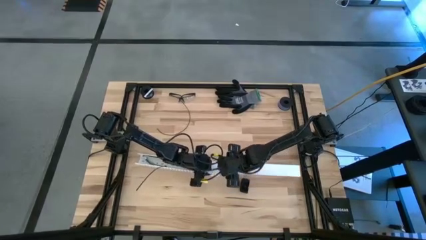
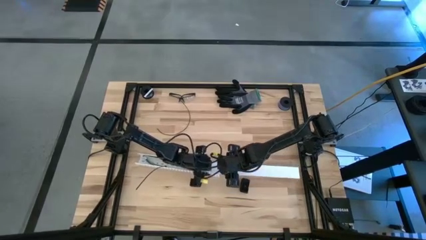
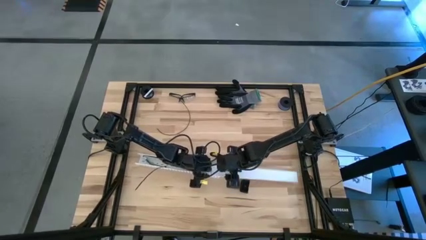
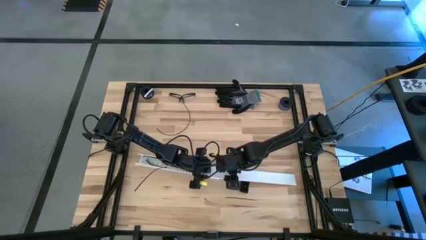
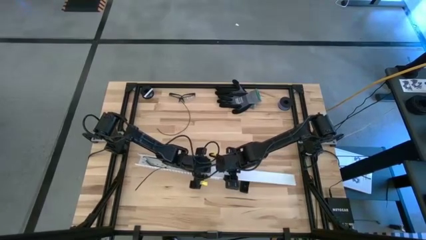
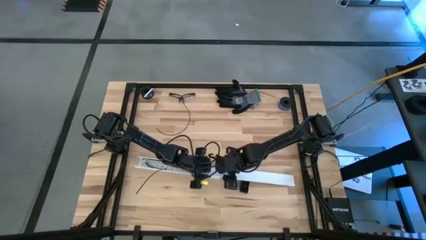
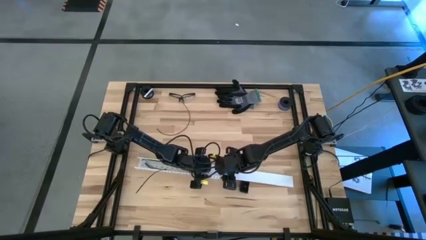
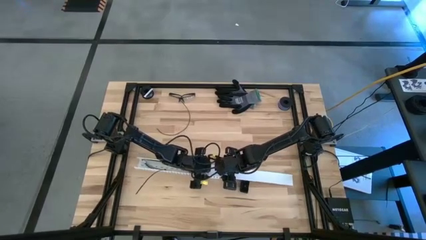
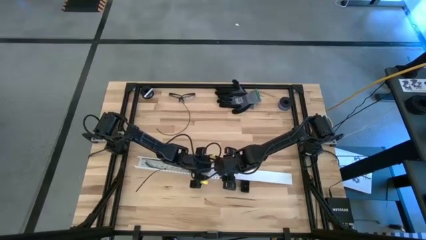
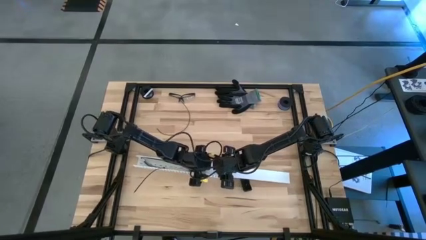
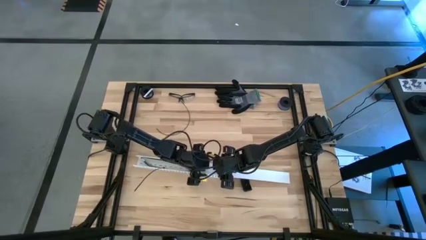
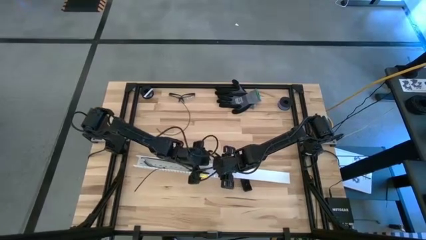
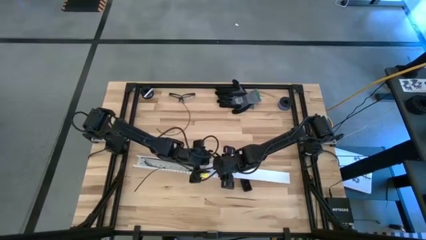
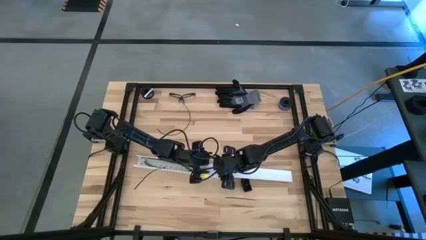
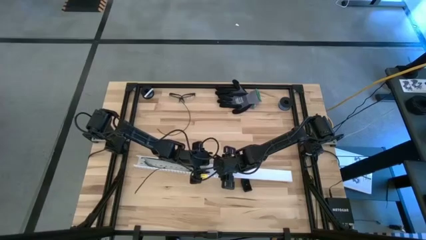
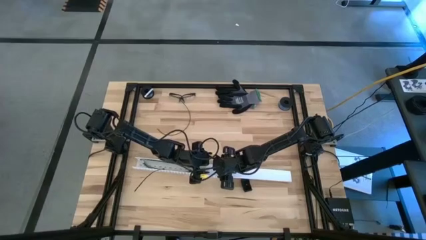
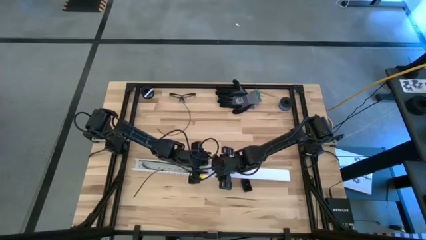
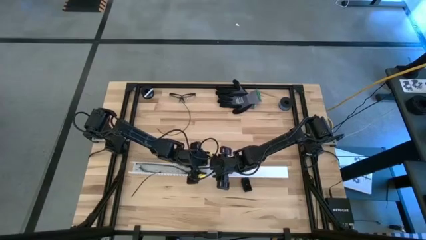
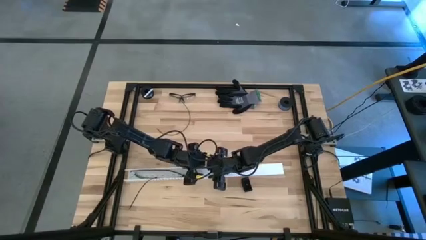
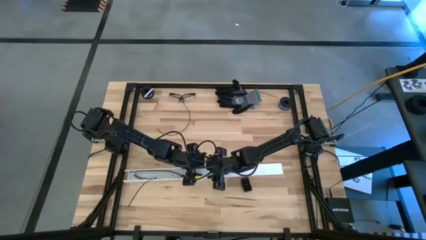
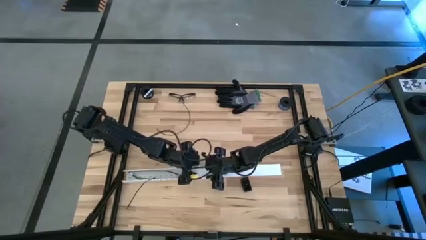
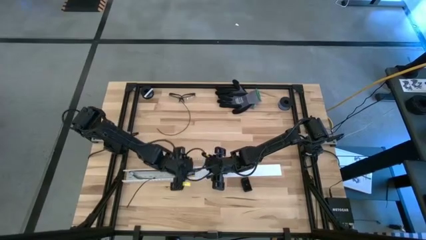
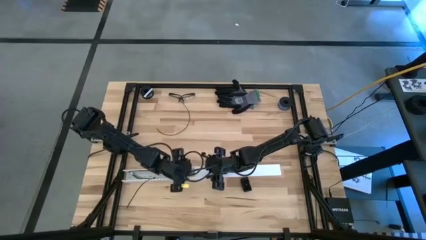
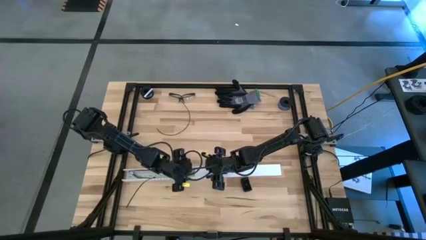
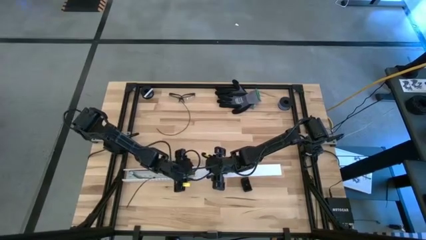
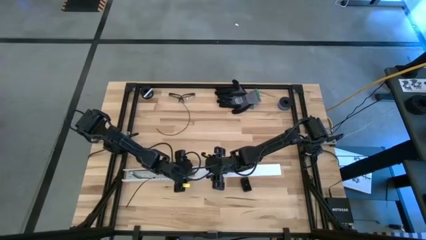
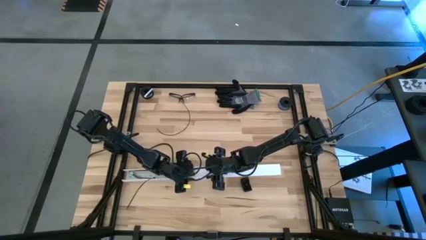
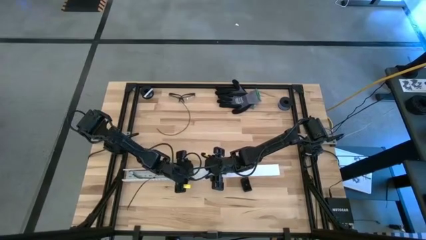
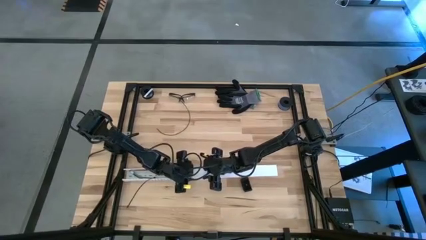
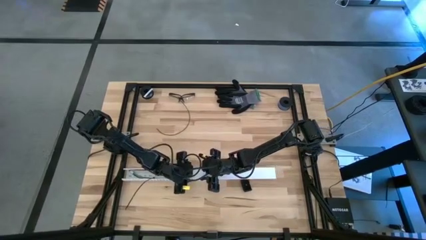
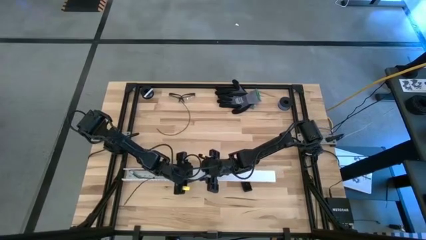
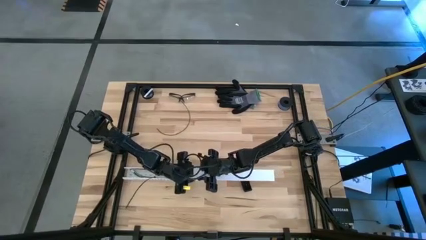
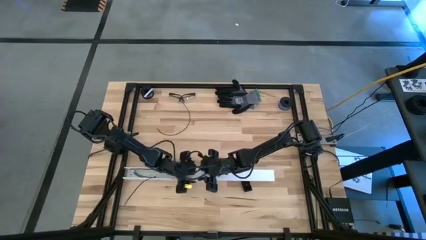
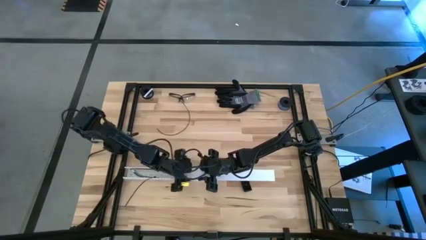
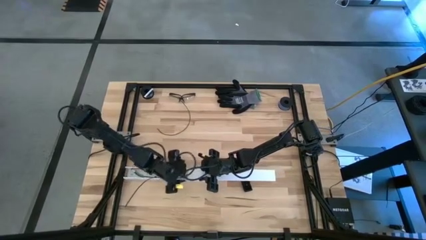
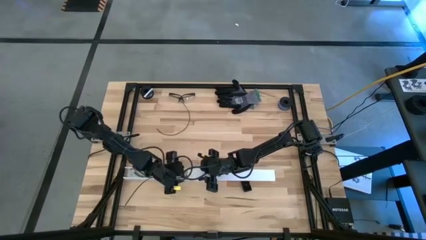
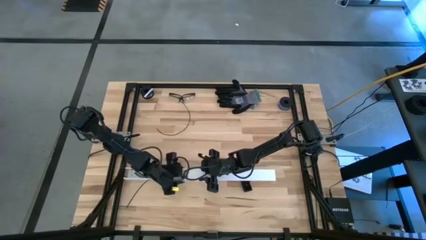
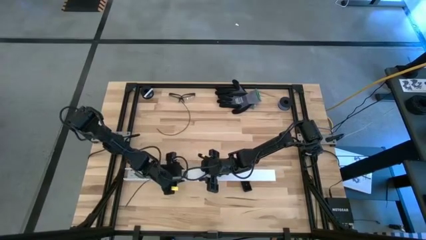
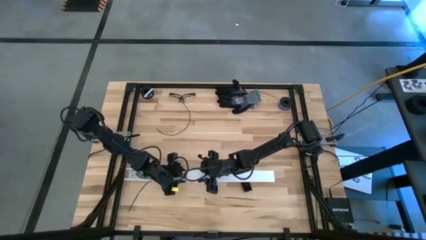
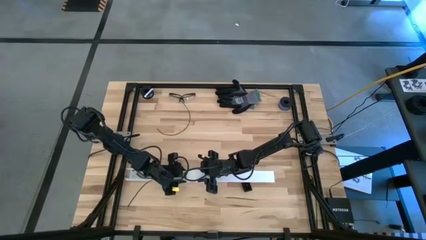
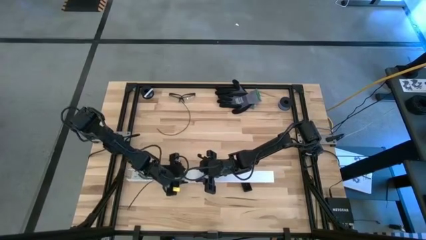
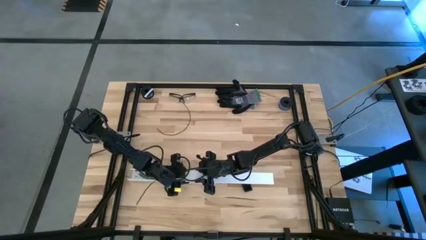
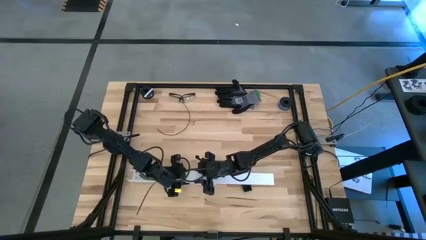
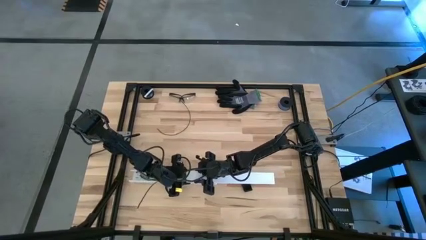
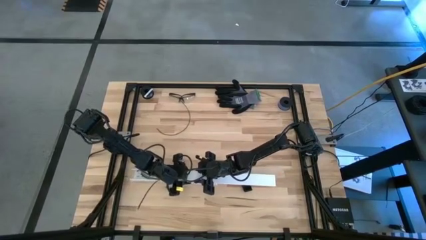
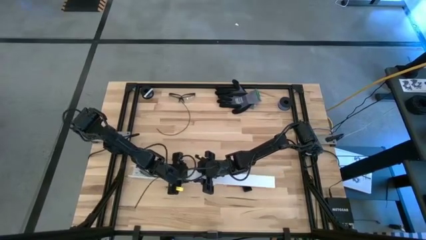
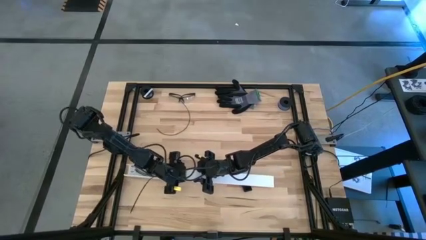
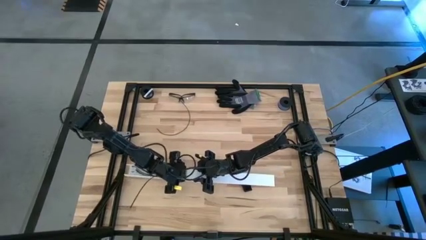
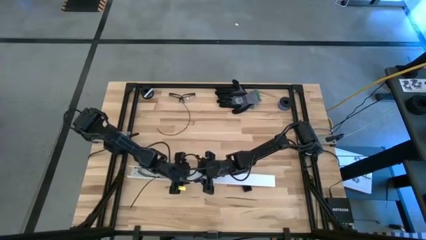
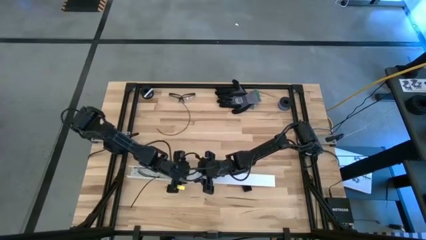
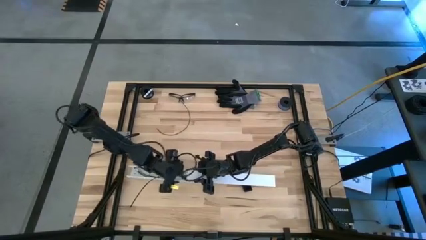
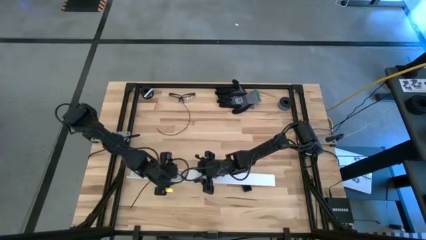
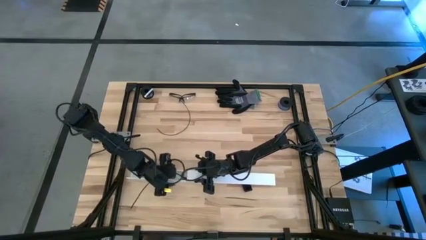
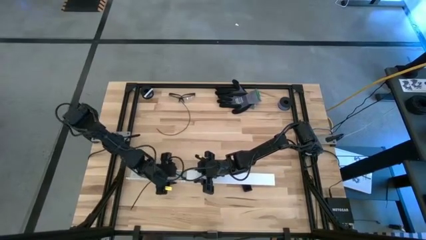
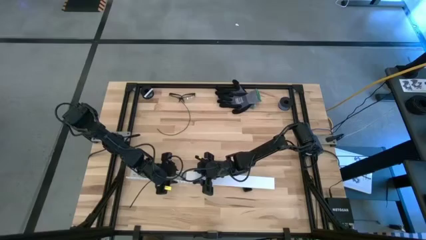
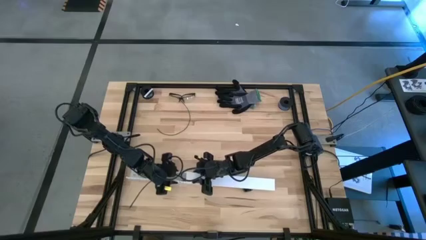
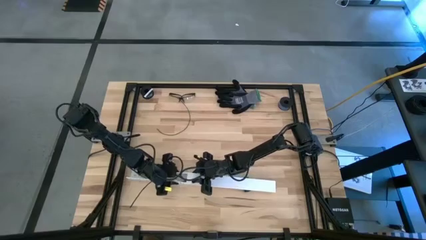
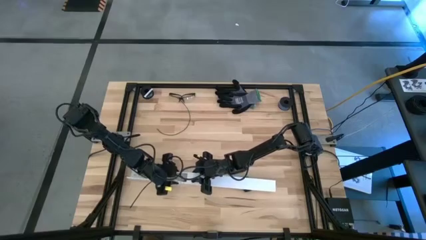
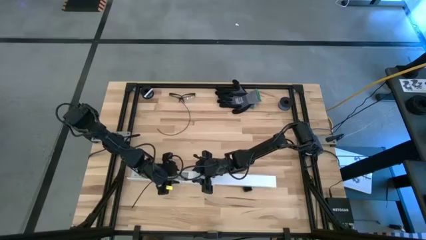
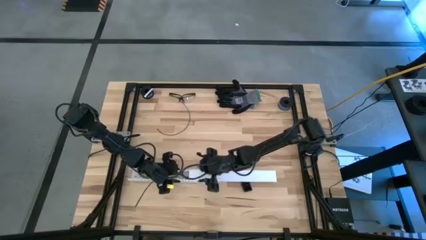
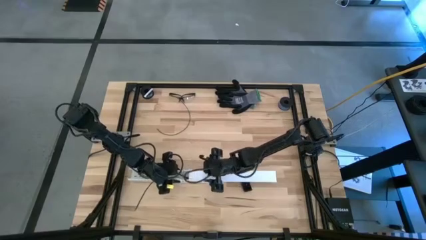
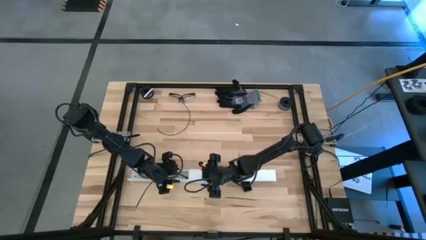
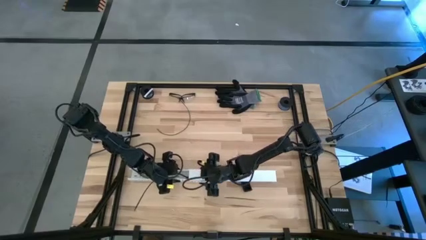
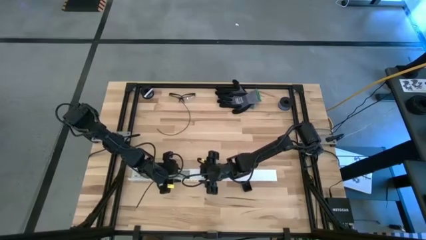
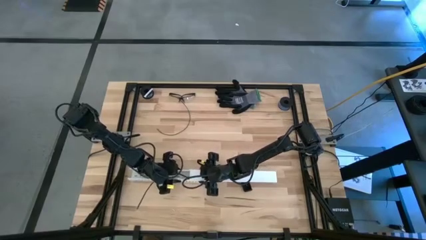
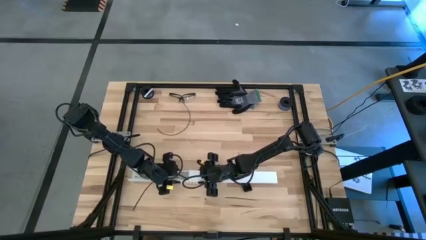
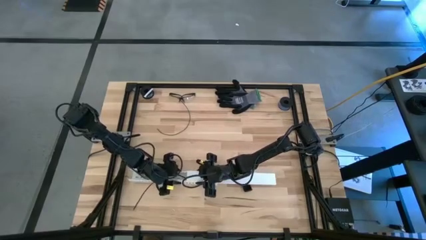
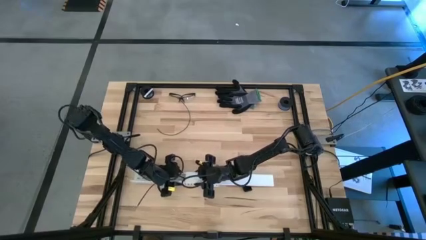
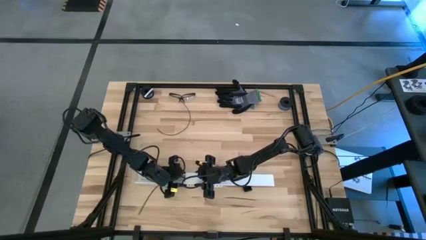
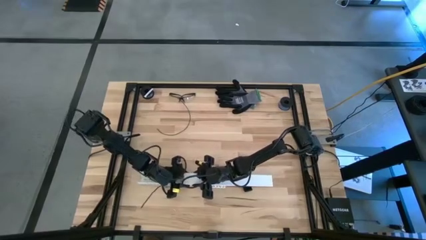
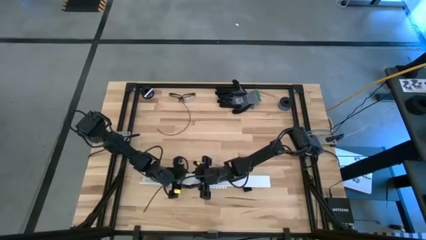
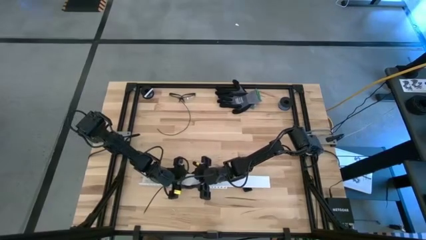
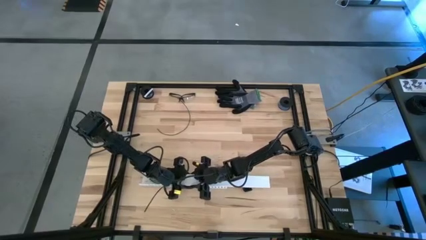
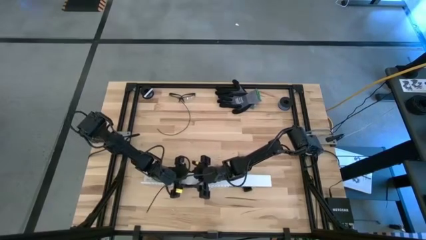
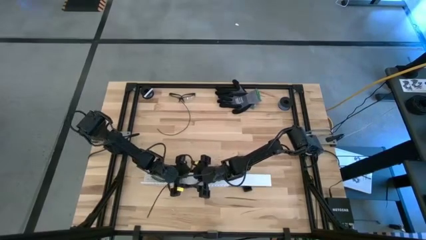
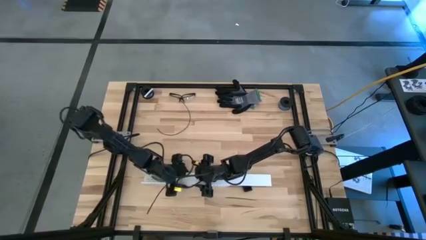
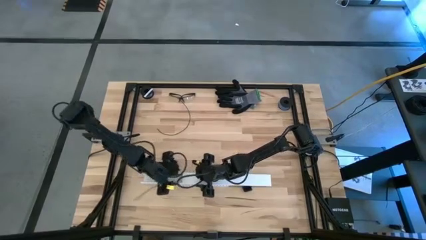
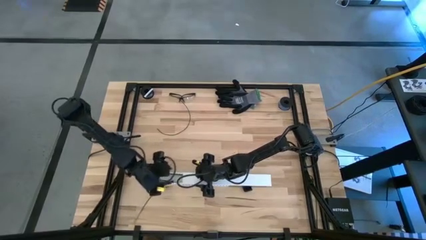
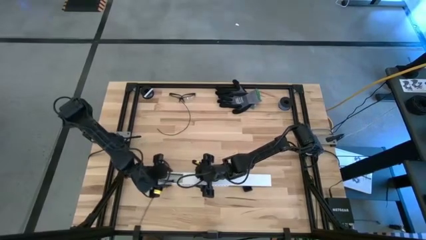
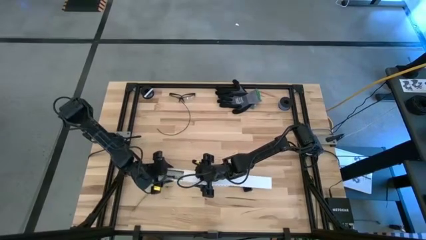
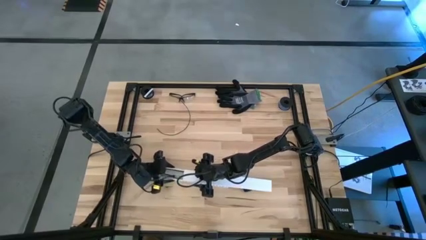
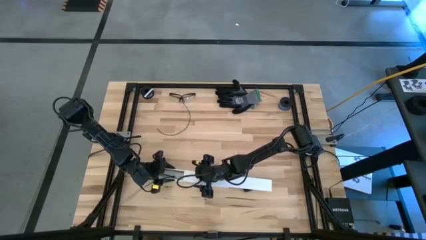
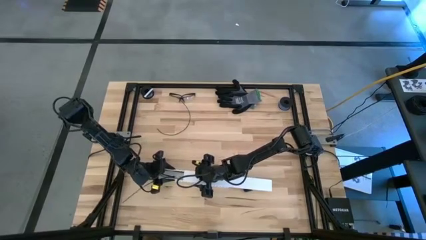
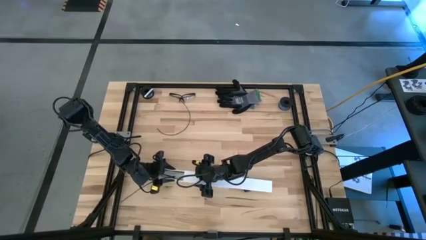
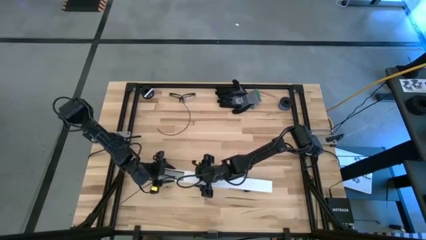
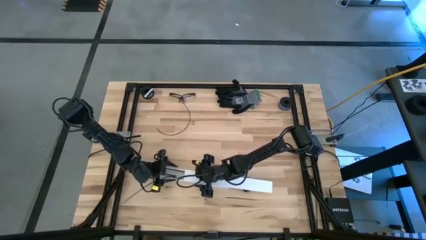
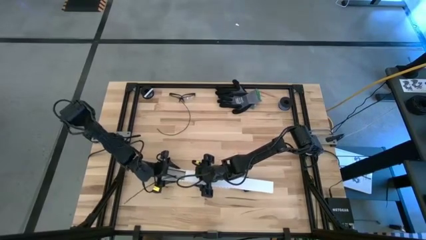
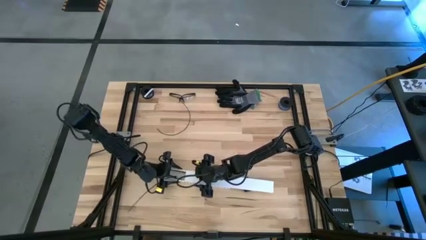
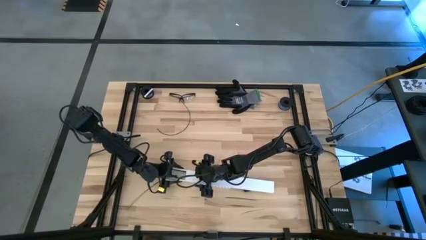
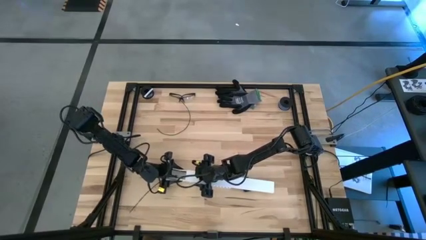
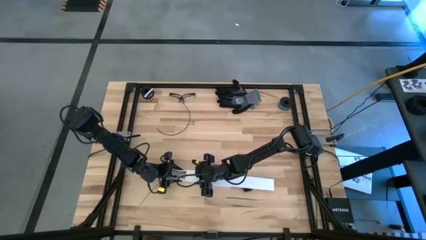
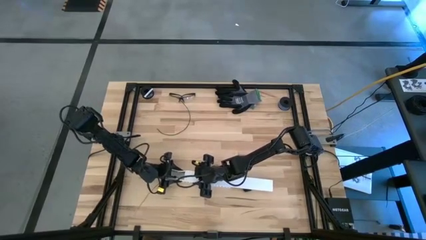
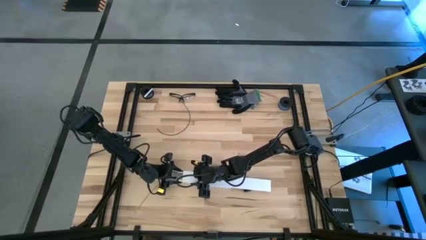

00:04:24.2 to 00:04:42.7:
Task: Ziptie cables
Close the white cable duct lid
